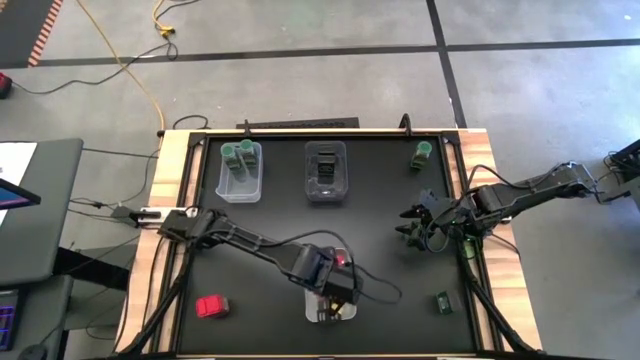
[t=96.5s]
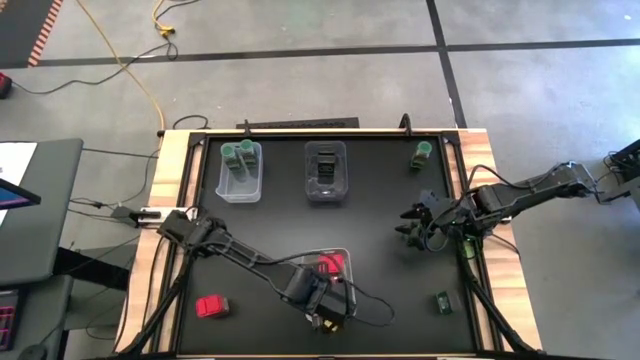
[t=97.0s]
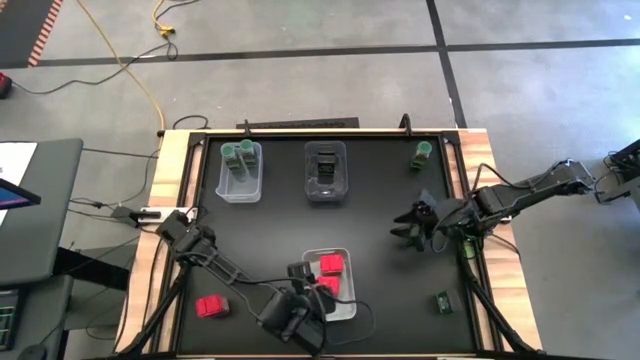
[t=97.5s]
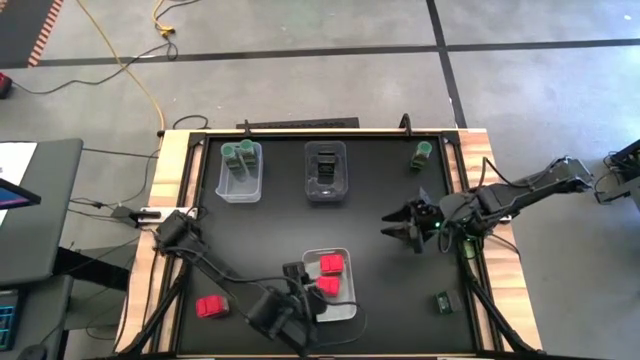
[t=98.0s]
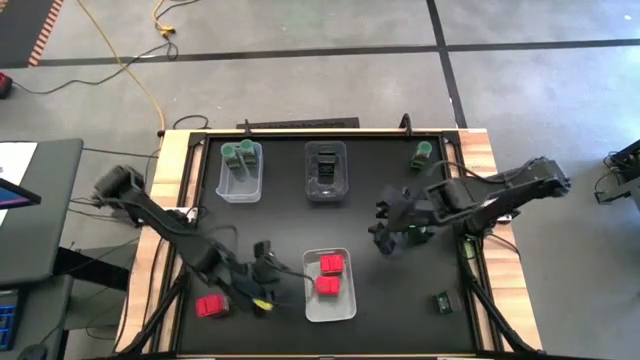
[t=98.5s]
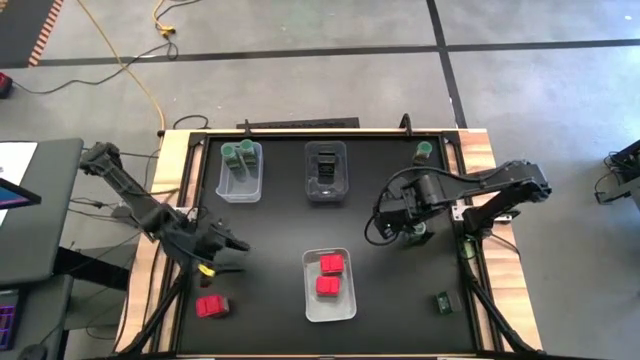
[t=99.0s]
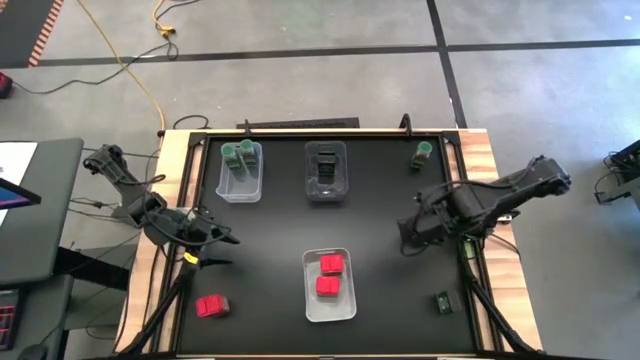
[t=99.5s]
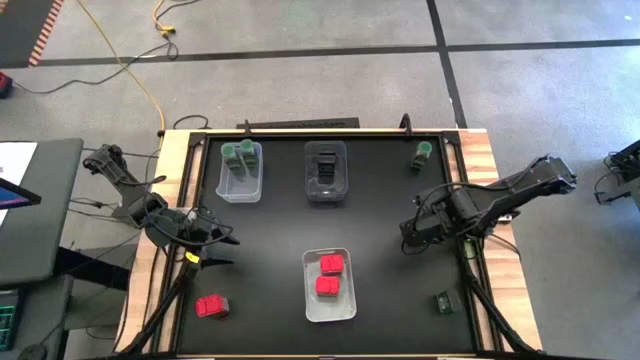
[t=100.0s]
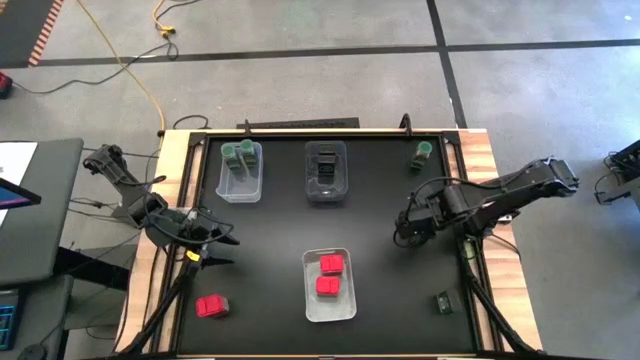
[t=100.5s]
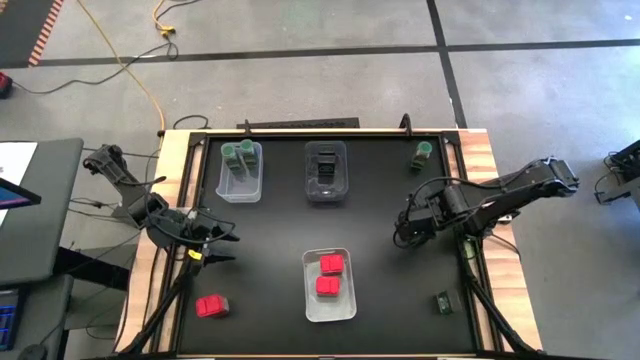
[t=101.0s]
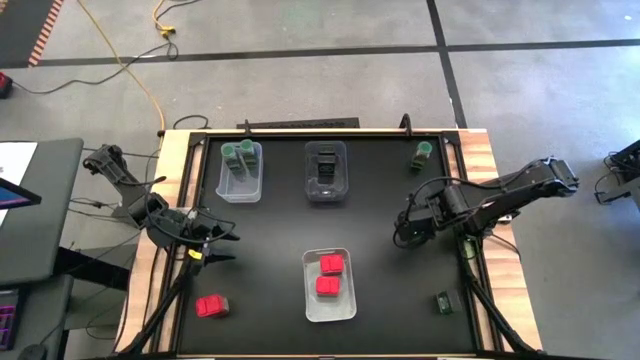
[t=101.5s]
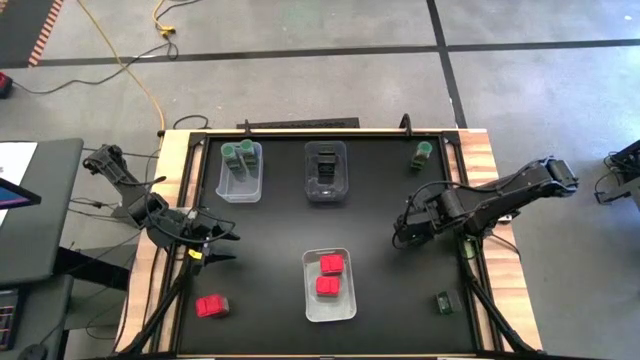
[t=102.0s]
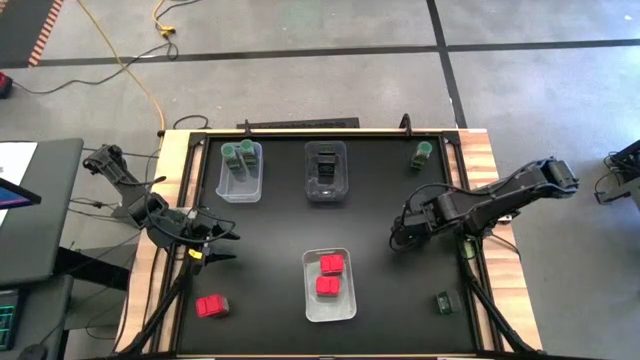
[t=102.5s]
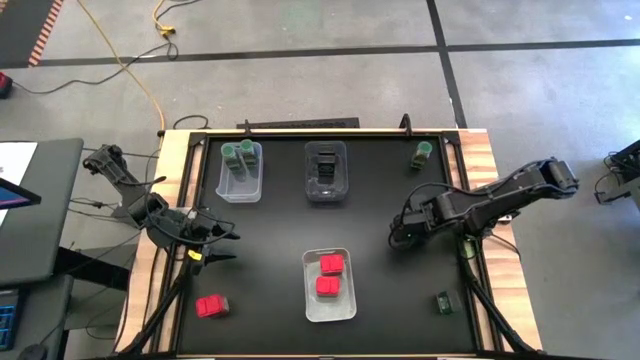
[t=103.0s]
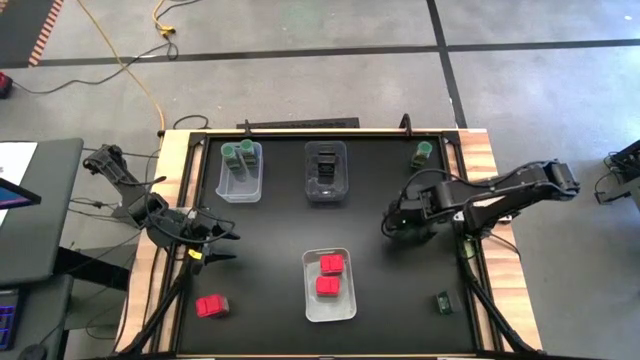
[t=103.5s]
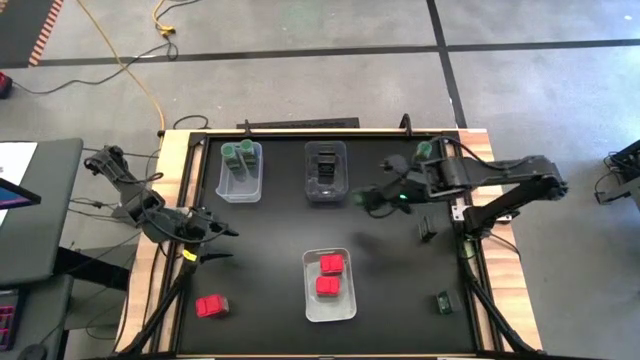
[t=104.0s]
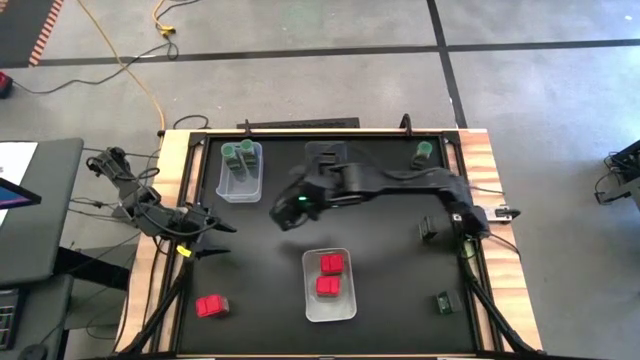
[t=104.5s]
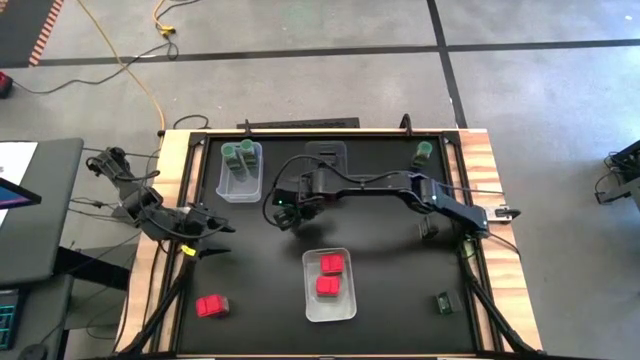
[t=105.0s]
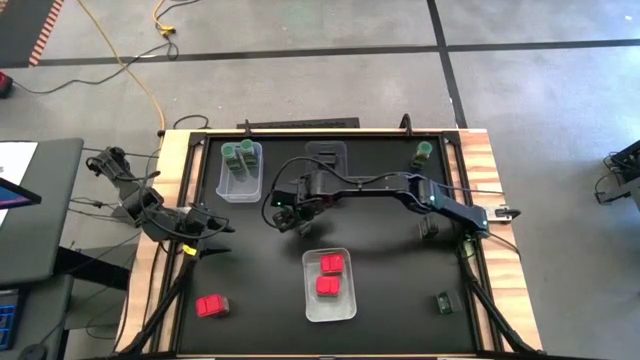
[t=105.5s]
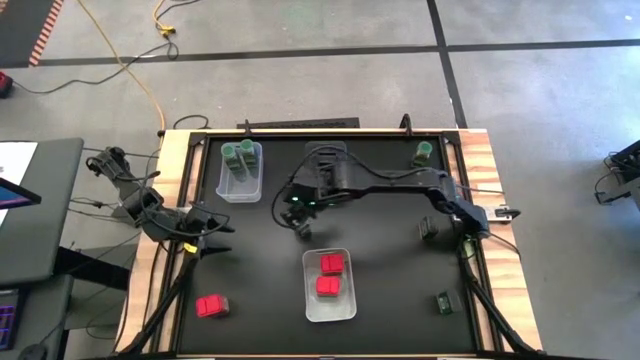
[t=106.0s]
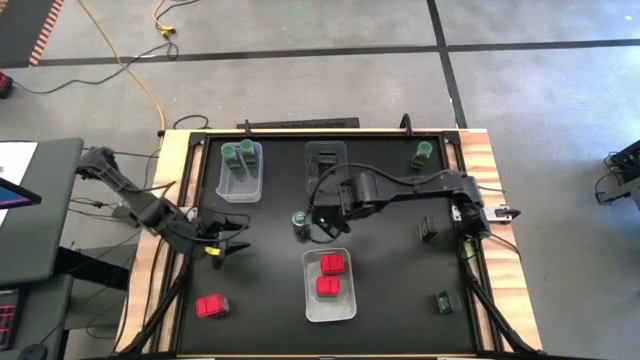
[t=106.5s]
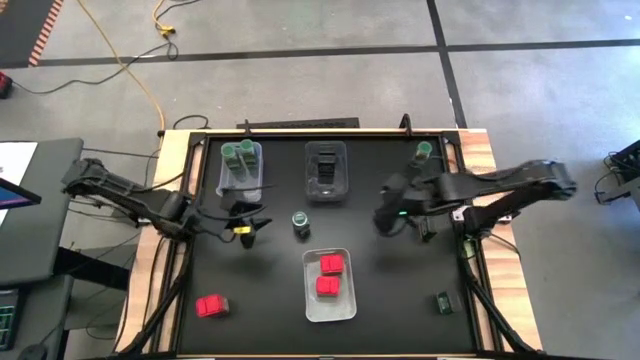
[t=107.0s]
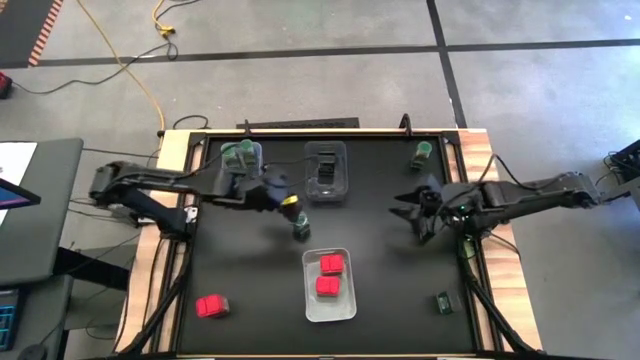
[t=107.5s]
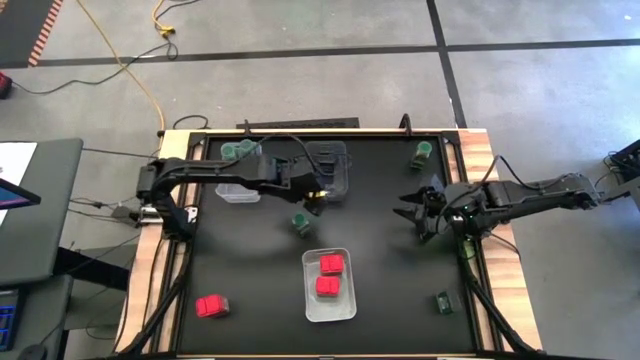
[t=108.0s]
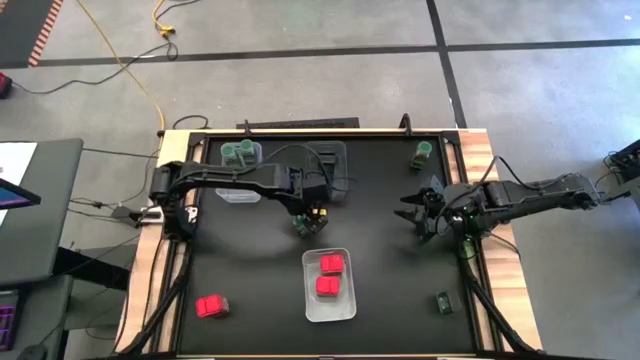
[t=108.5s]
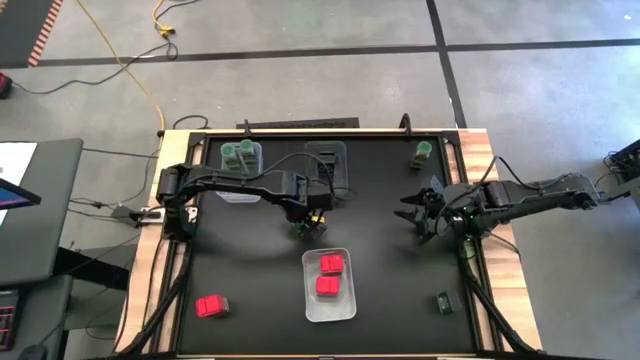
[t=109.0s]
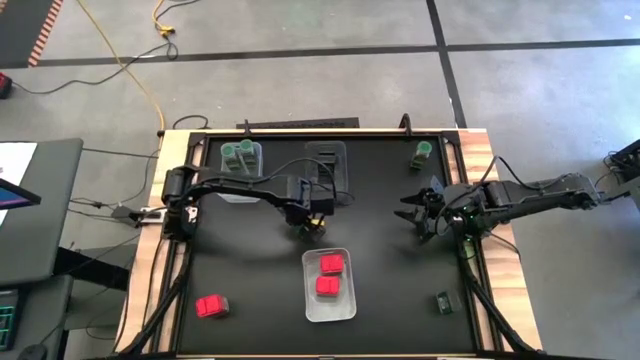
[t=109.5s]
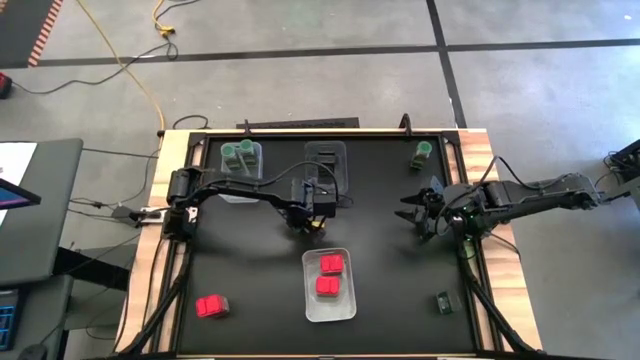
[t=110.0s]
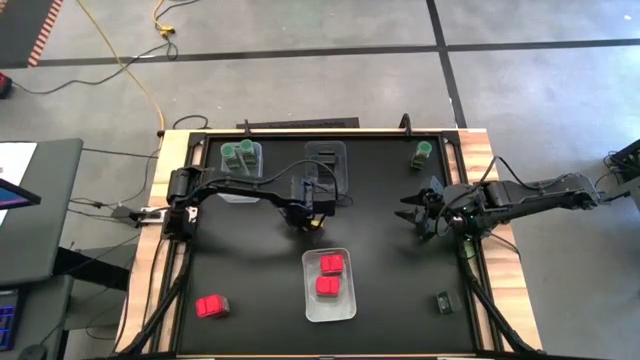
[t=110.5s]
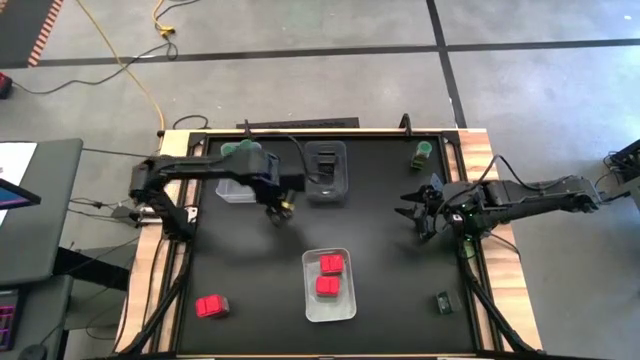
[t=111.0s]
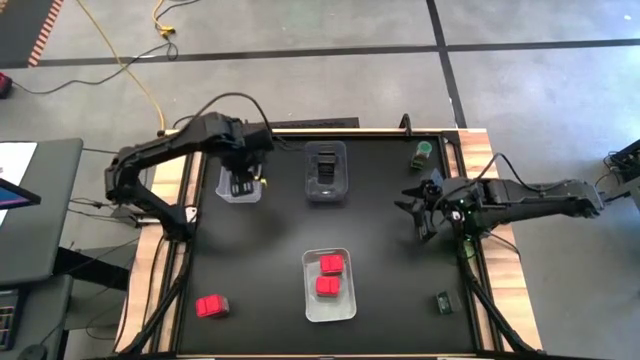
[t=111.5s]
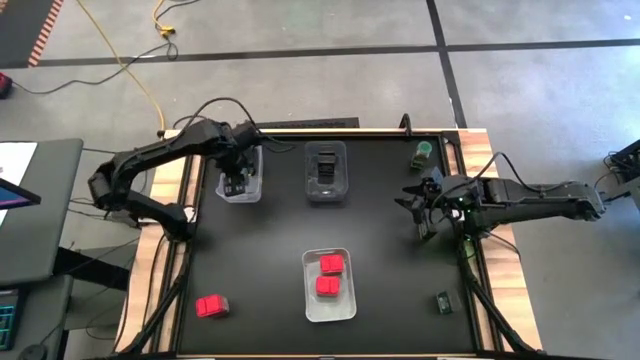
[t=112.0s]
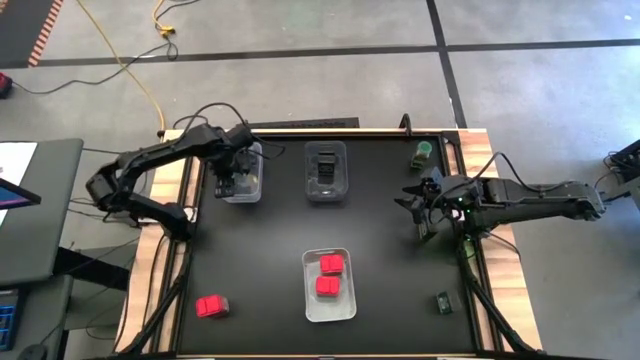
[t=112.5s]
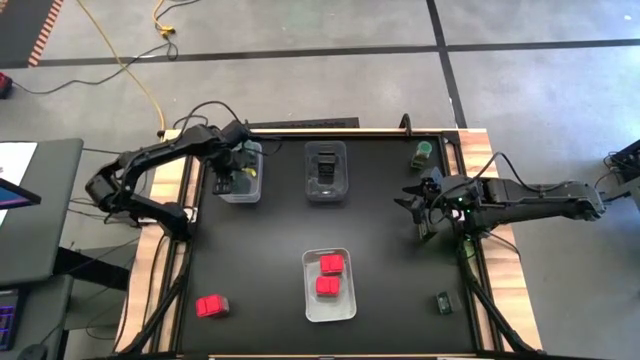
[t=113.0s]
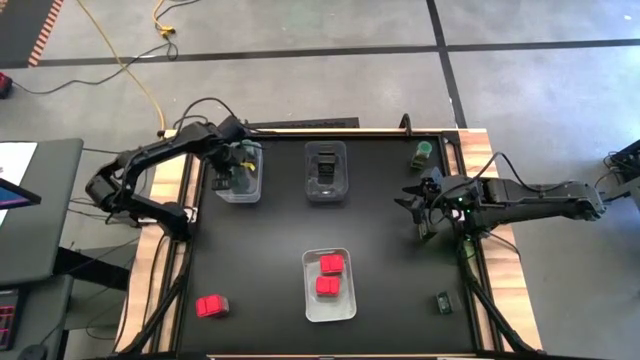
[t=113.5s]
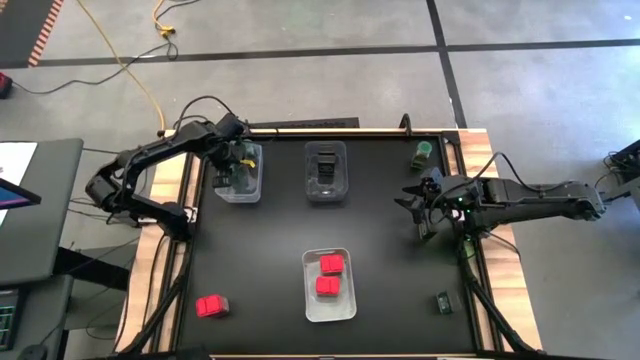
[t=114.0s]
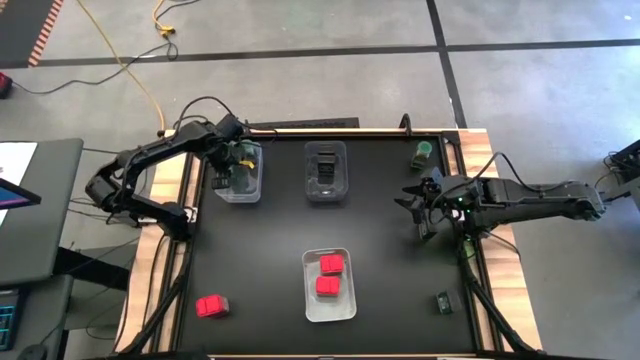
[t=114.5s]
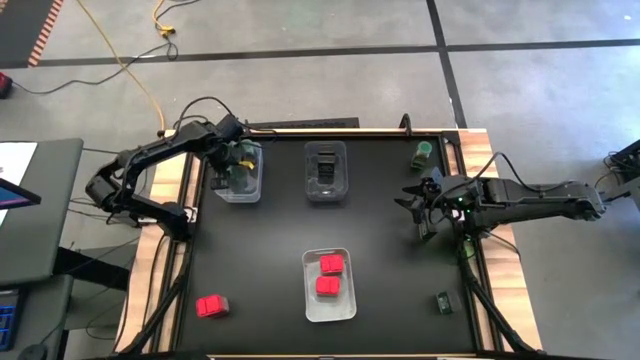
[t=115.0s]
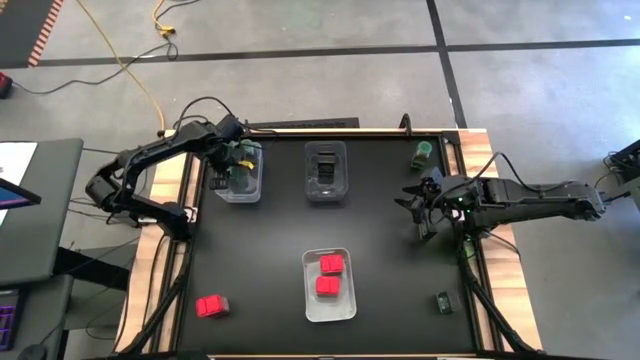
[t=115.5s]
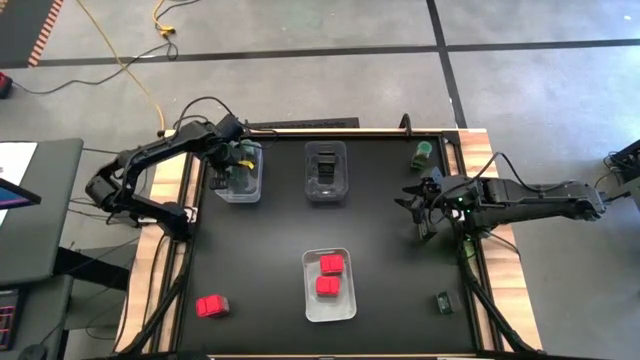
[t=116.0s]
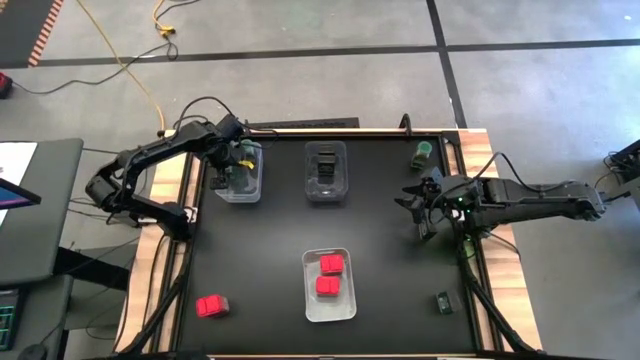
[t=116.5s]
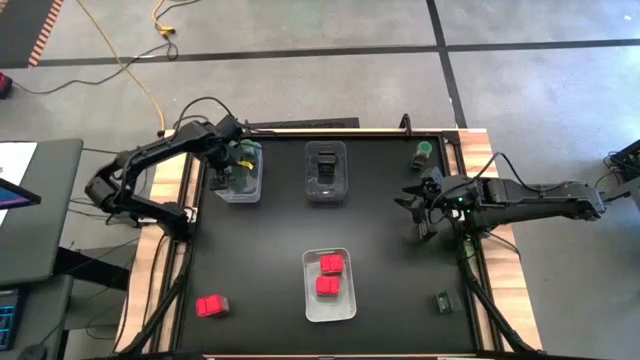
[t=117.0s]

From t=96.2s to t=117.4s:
Task: Sort spices by type
Put the bottom green seasoning bottle into the transparent bin
